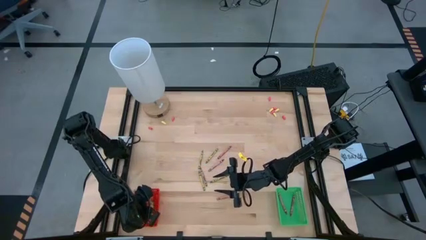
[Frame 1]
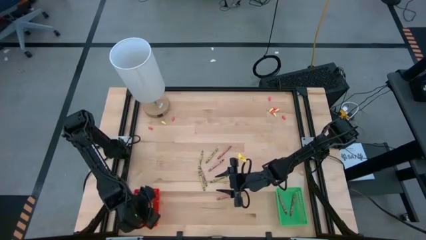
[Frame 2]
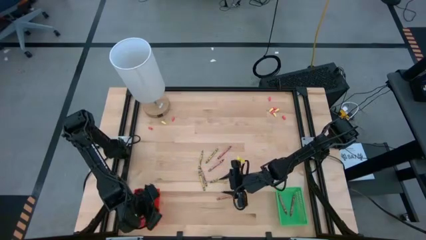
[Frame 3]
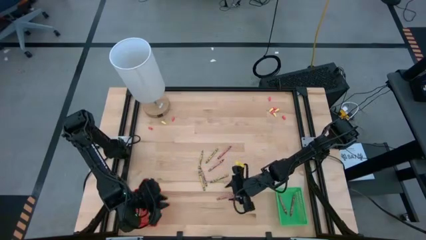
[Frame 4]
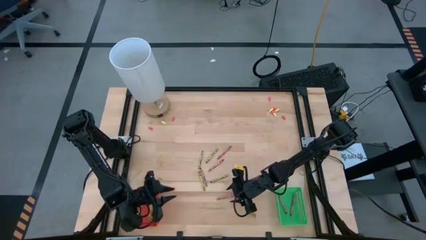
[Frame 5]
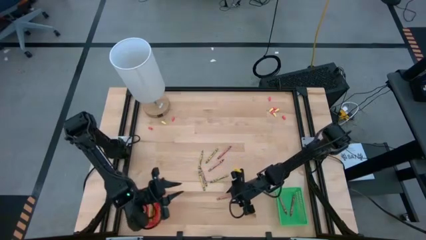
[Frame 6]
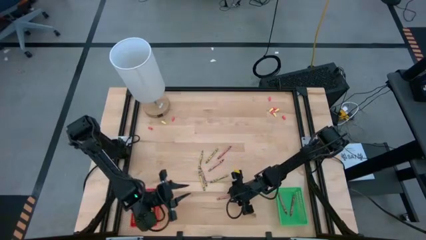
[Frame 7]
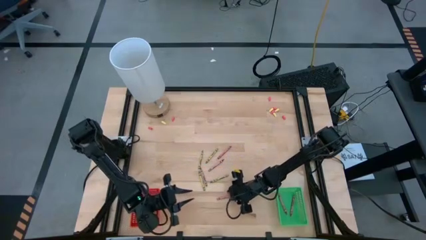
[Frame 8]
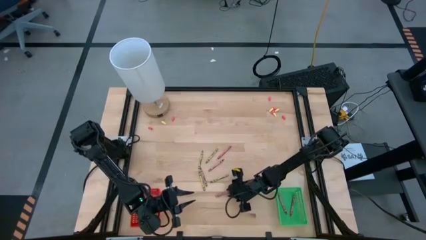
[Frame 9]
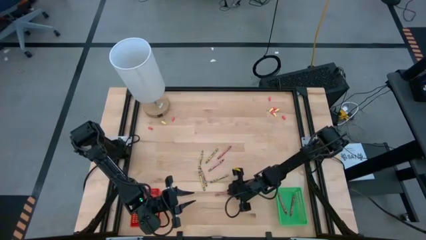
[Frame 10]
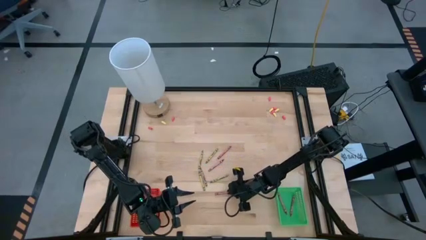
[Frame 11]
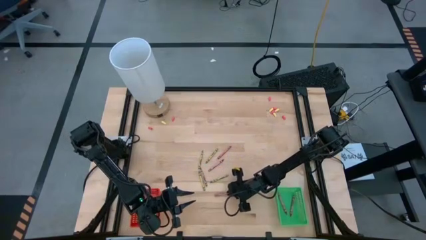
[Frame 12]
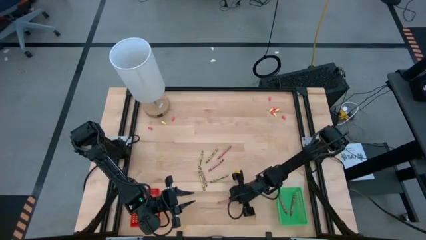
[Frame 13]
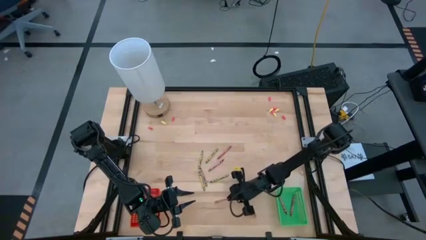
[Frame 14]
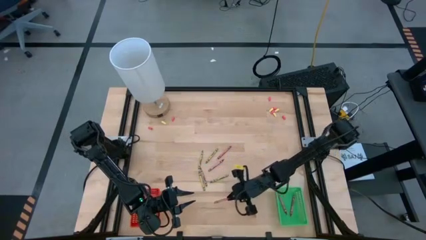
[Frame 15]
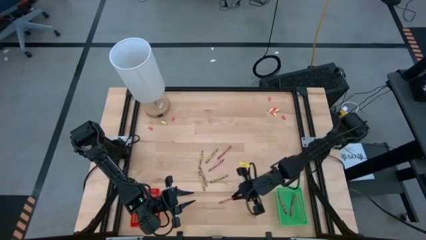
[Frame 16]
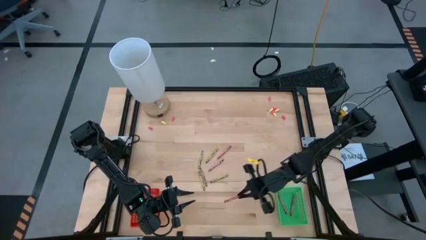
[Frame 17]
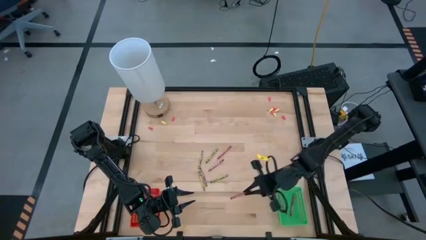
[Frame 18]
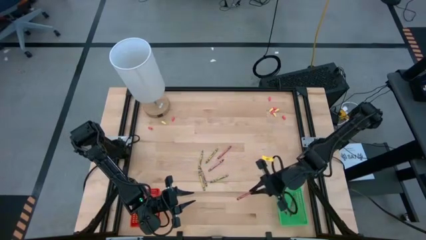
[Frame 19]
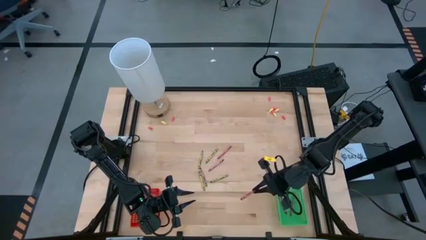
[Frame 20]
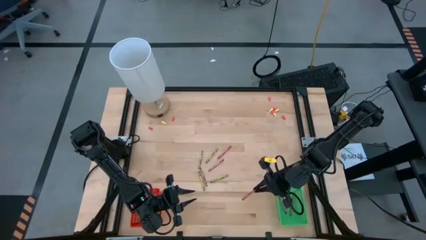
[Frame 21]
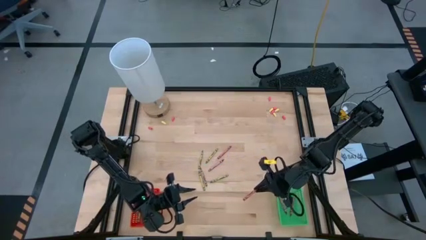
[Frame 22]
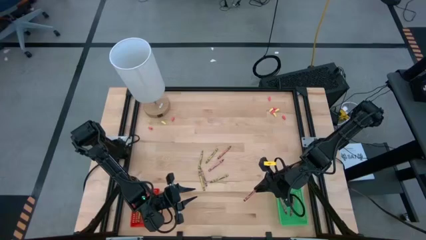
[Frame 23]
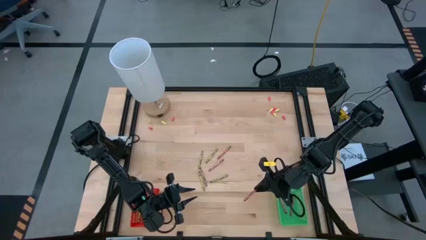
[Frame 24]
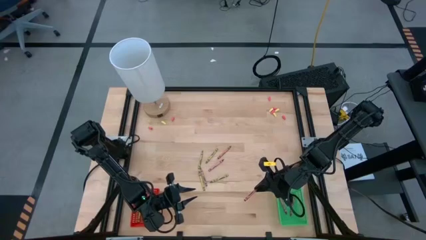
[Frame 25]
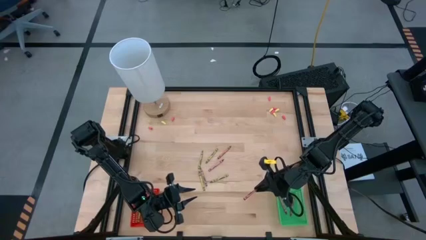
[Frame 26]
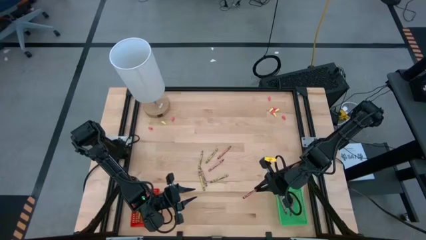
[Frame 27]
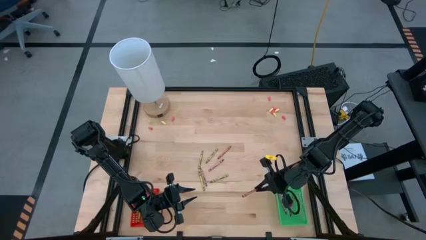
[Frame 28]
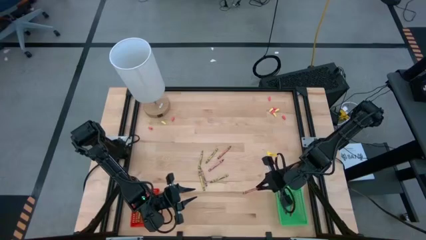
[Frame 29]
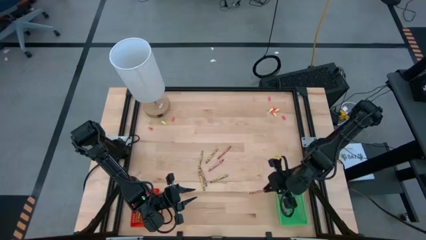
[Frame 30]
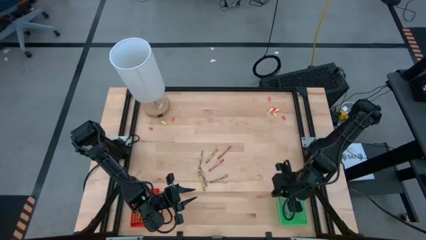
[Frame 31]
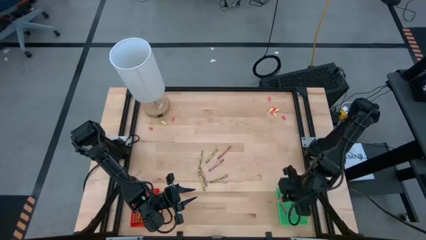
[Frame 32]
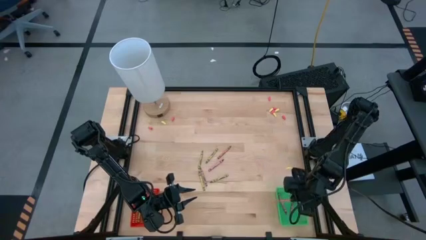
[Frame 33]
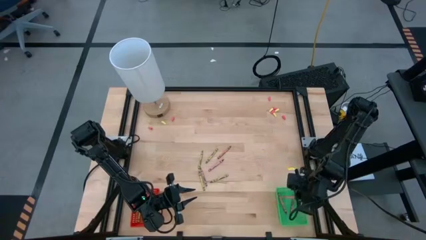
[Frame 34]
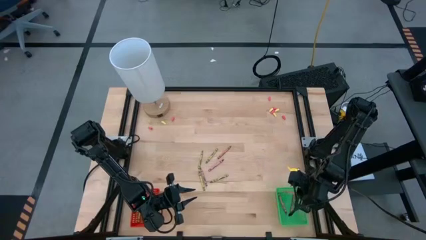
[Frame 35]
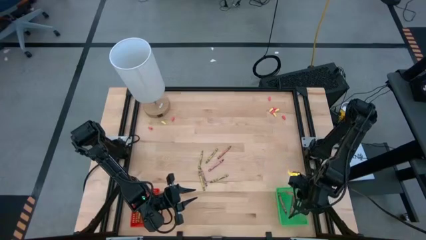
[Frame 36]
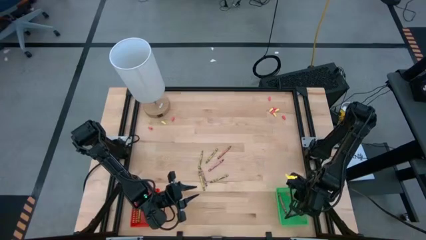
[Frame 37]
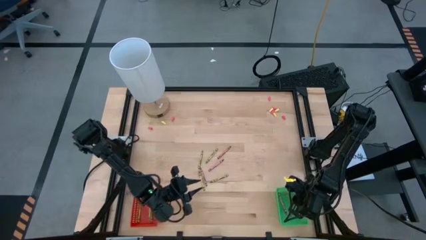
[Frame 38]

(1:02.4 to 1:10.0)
Task: Sort crayons
Put the red crayon into the green bin

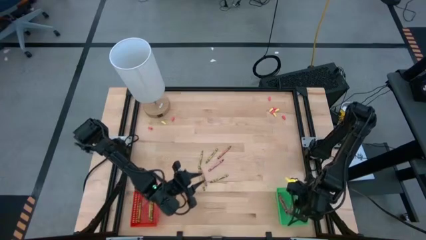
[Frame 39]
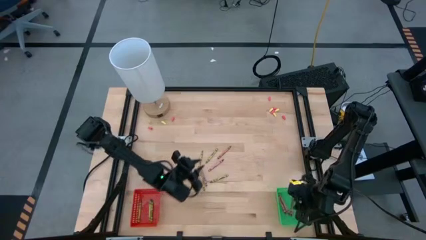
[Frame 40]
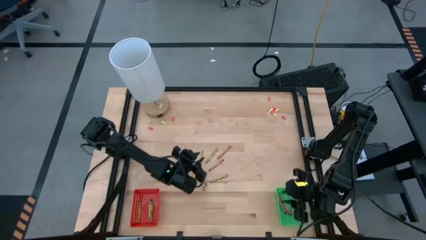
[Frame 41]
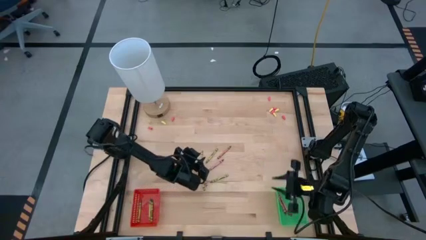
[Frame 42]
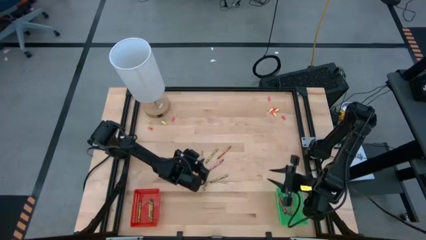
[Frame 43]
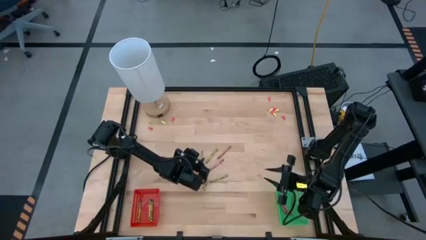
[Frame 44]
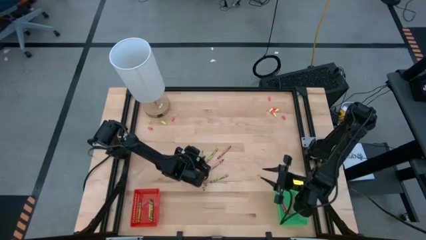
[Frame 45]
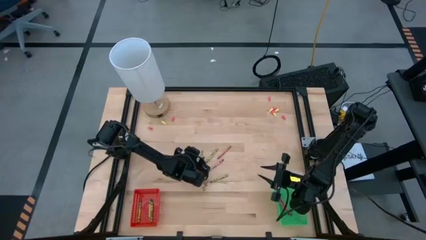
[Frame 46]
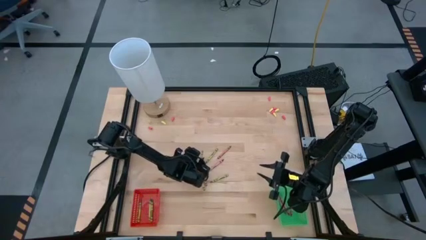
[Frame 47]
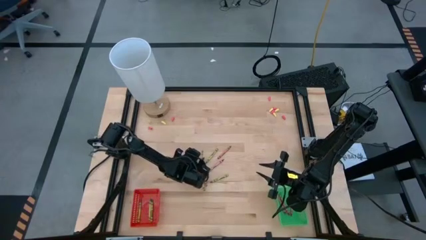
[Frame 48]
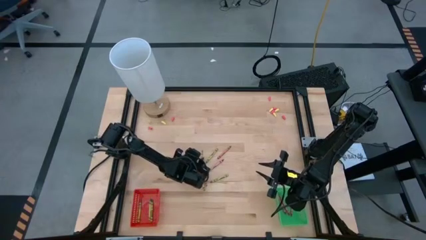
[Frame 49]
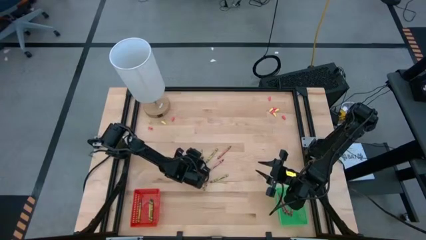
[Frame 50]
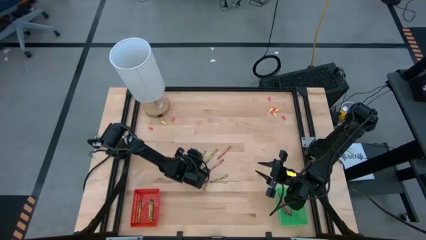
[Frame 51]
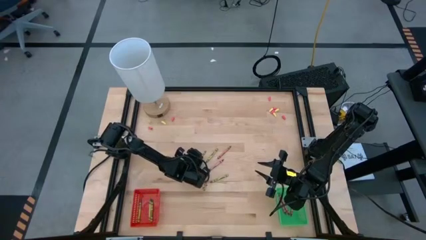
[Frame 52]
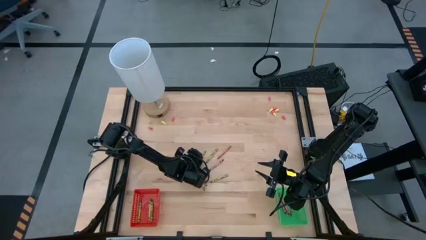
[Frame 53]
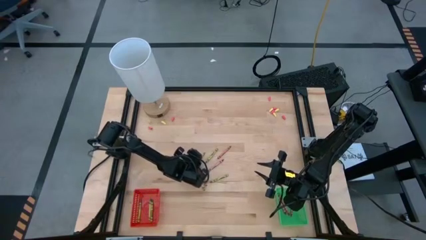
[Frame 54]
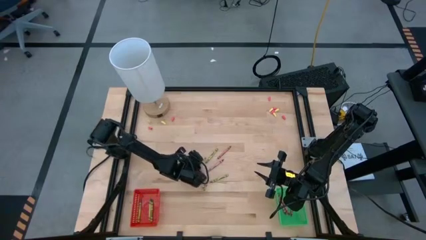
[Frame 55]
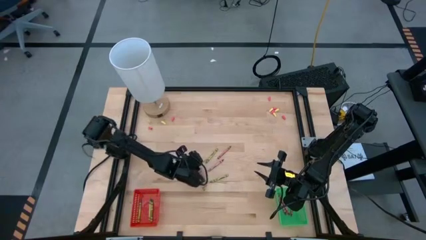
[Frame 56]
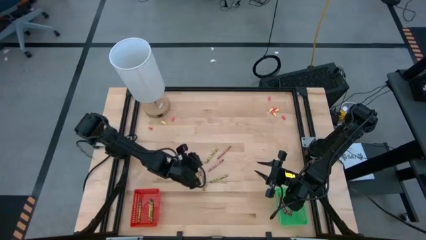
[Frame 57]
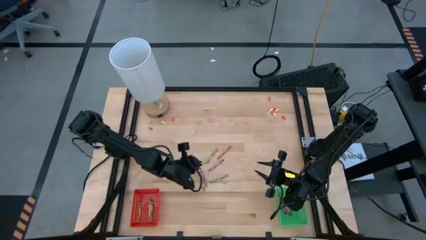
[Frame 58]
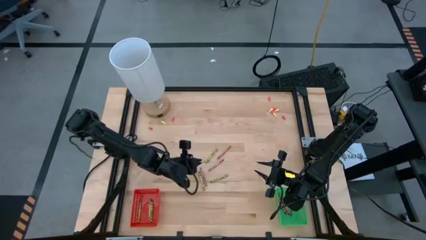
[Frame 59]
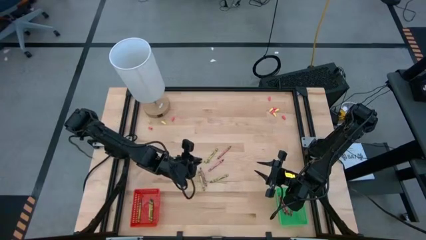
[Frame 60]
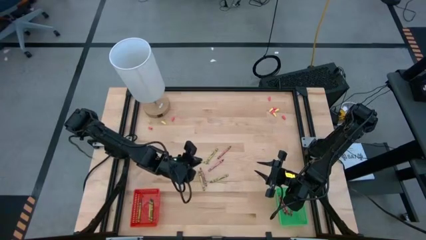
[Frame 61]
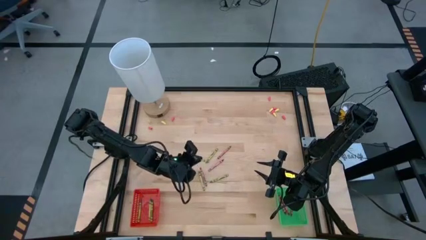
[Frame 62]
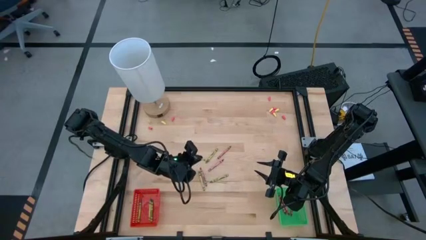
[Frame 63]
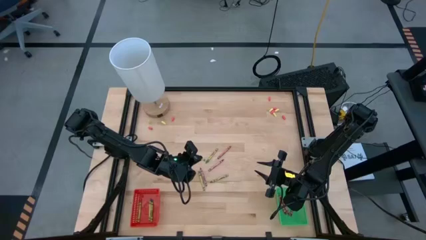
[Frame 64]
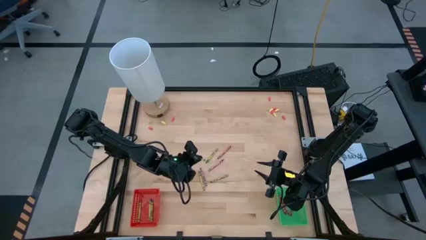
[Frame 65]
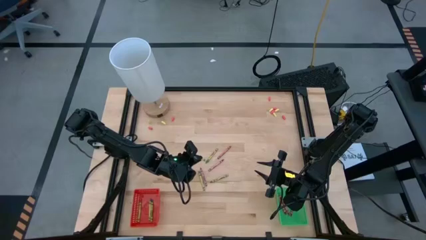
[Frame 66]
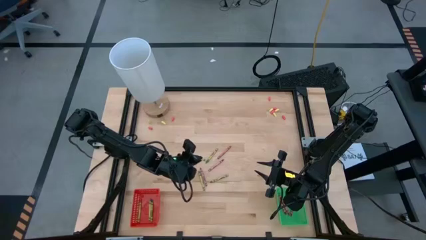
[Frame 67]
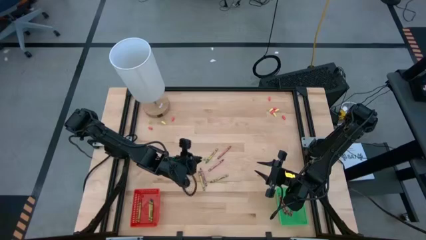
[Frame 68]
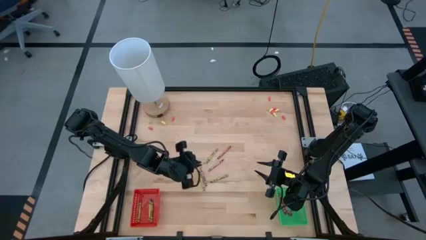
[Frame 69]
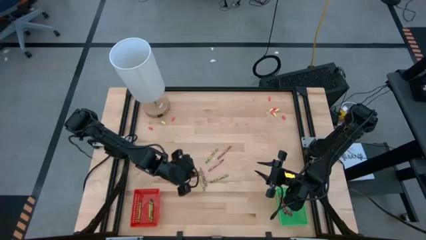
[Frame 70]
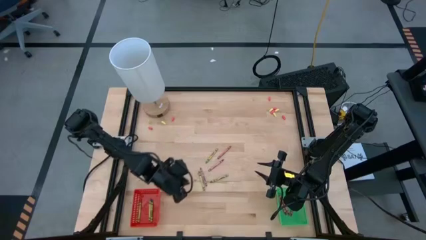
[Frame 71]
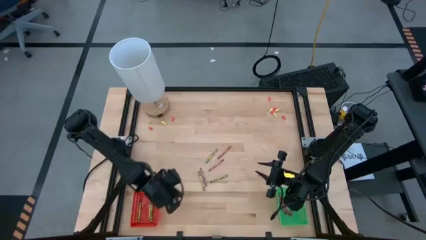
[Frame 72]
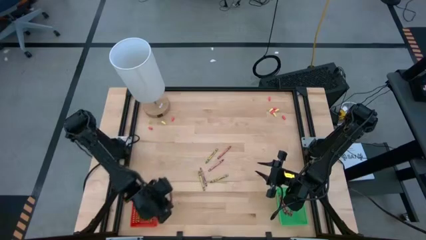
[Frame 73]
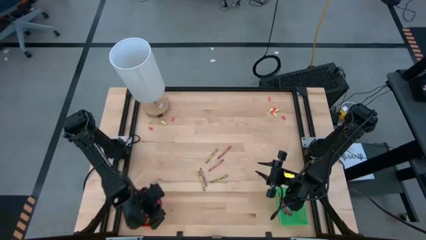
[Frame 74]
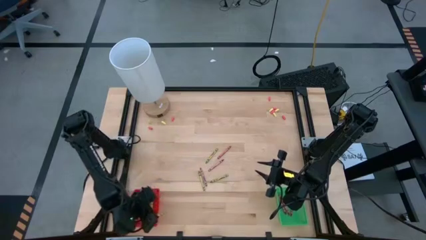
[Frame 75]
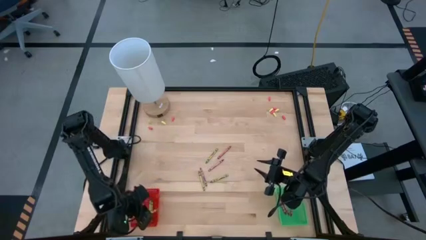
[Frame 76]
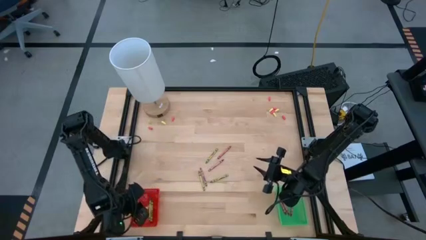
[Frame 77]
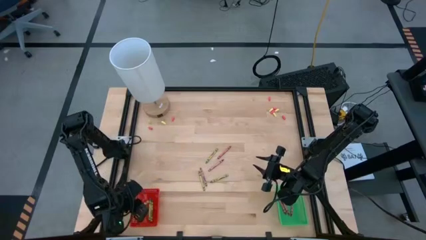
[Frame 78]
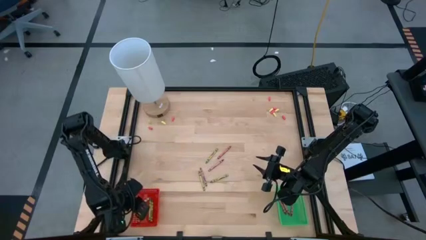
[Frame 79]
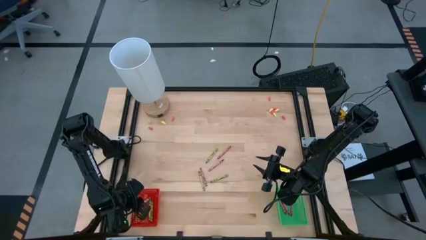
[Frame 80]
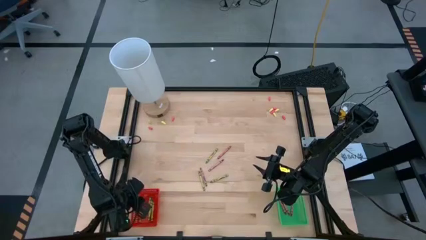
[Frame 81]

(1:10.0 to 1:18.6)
Put the green crayon into the red bin
